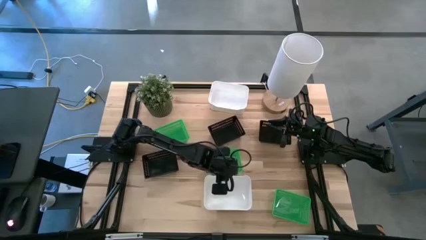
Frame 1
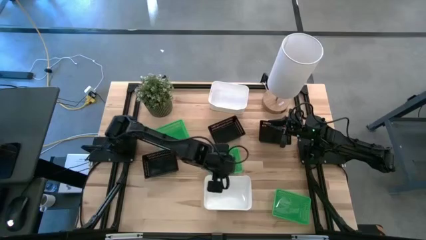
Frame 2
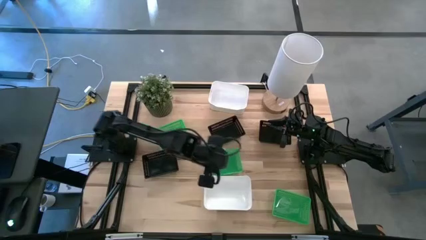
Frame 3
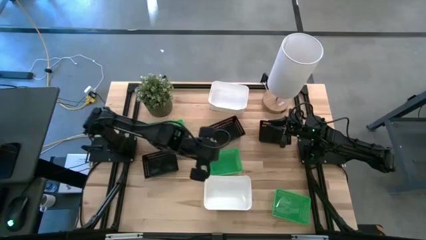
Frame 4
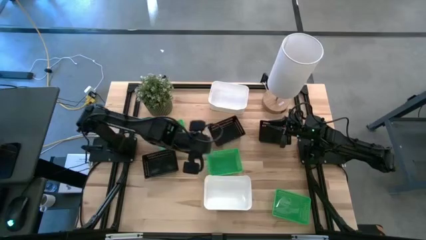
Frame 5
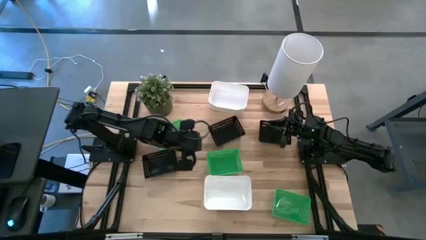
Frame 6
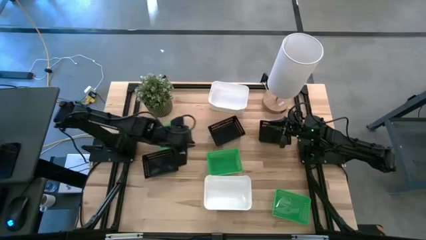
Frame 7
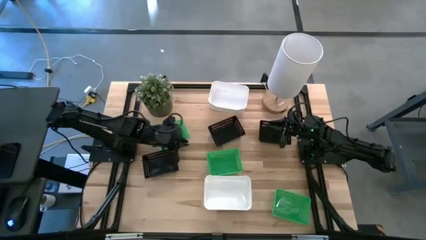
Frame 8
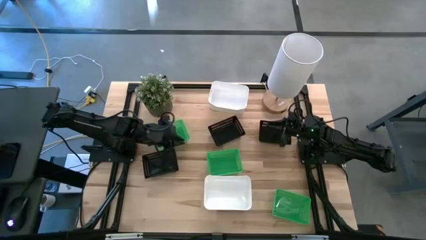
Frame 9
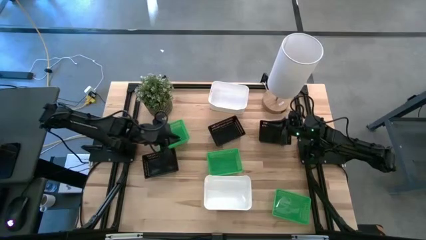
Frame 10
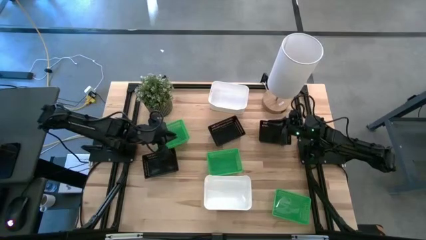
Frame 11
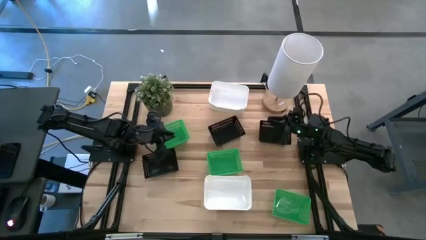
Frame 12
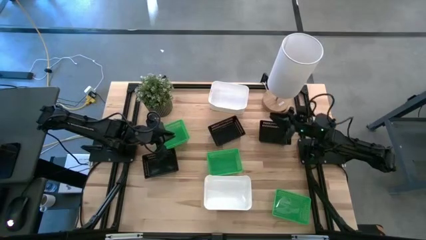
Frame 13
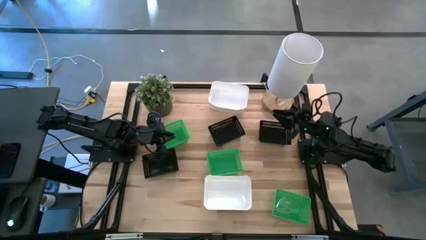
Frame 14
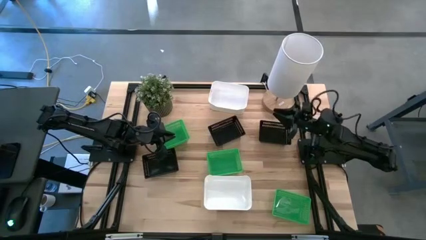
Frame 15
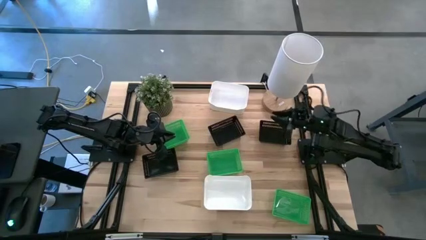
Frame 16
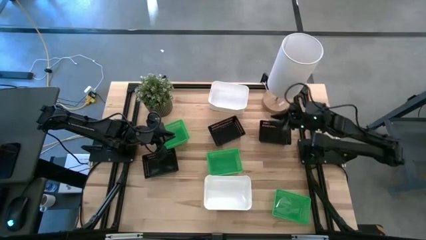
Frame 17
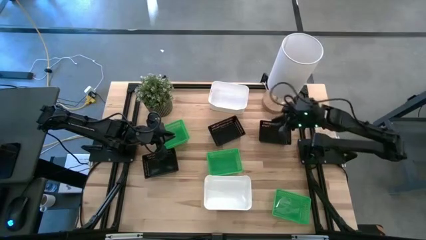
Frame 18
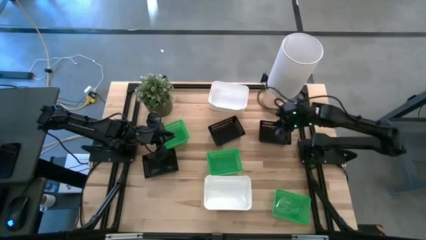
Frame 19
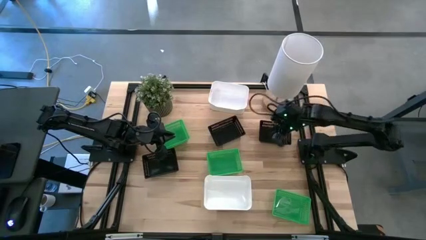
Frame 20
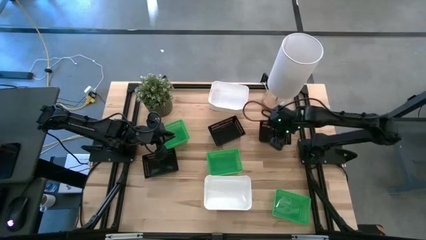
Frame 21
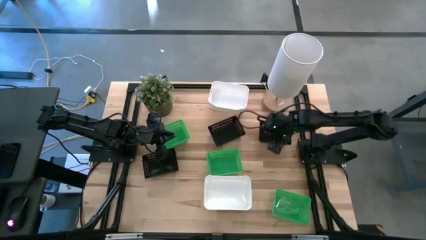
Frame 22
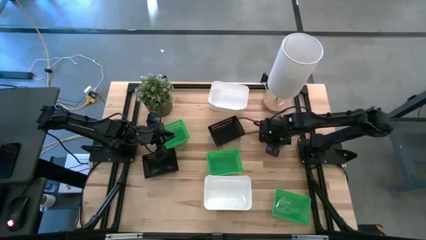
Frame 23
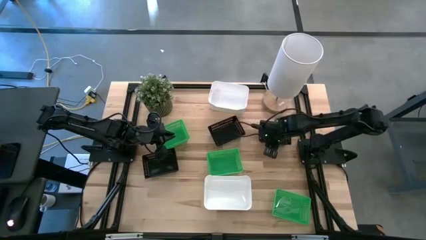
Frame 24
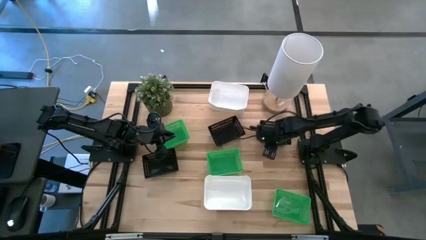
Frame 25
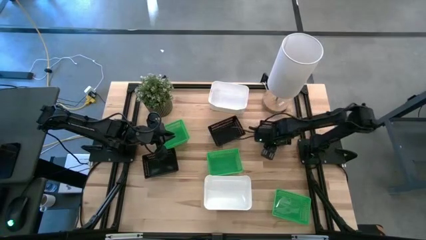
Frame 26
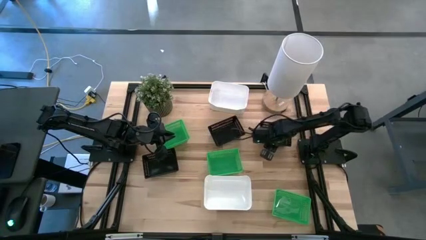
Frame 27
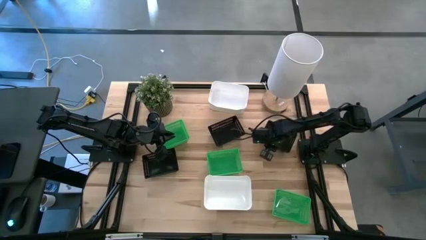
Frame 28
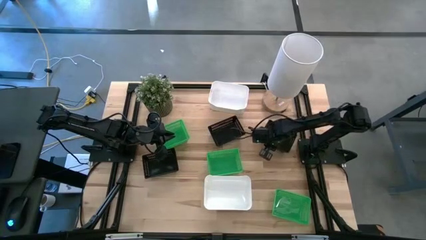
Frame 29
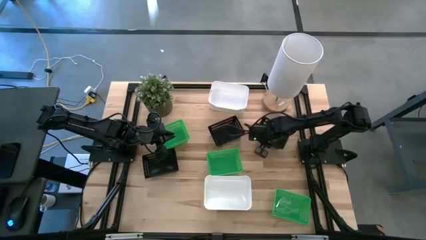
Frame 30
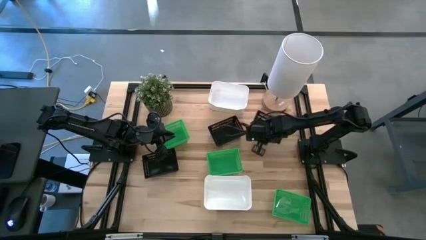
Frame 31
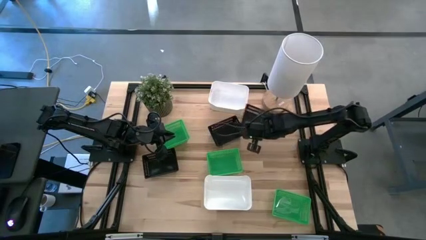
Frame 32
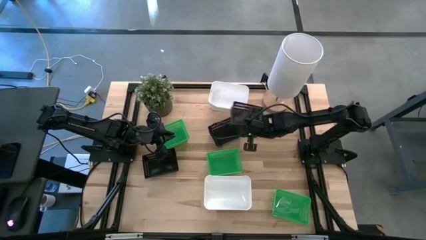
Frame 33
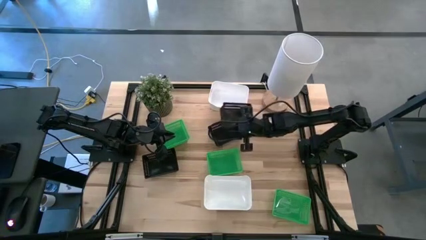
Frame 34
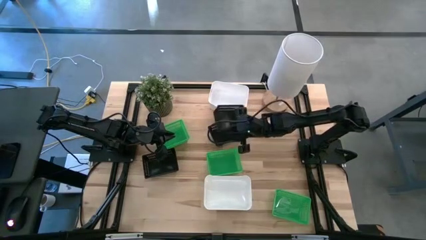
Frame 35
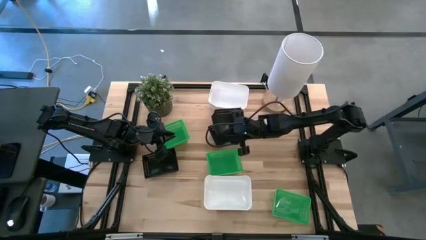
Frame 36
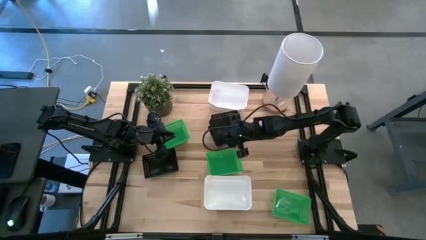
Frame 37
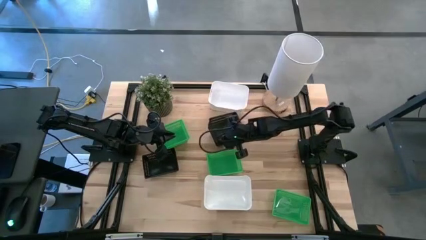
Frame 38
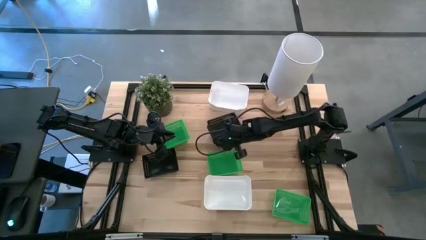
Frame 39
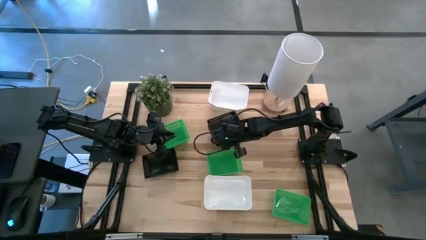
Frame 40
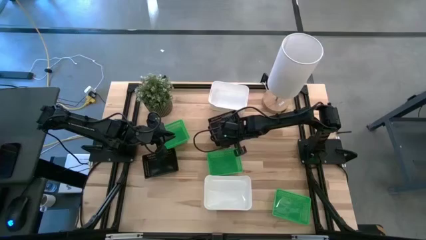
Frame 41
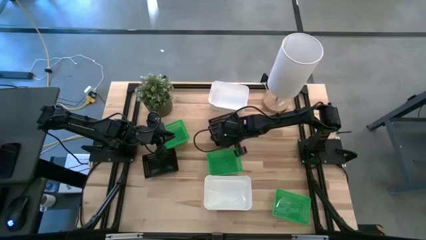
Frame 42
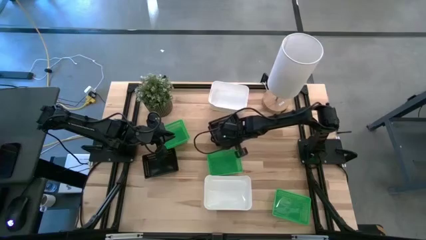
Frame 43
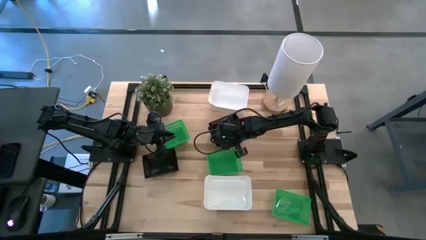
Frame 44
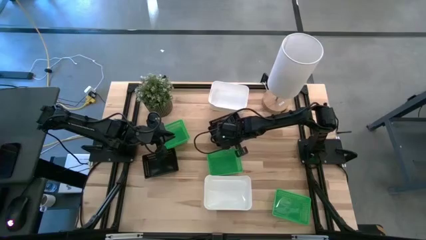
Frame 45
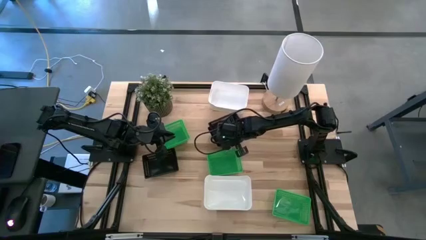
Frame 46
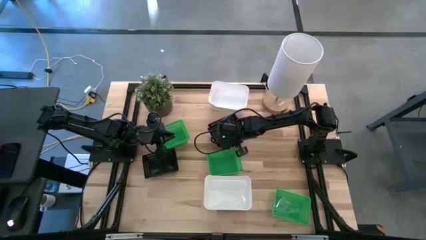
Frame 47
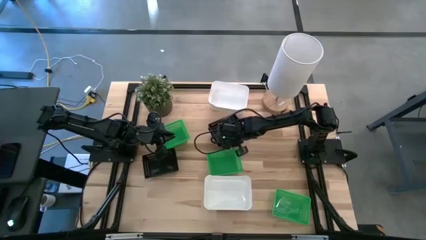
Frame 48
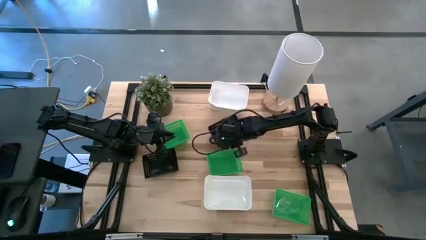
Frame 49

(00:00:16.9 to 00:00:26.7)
Stack the top right black bin on the top left black bin

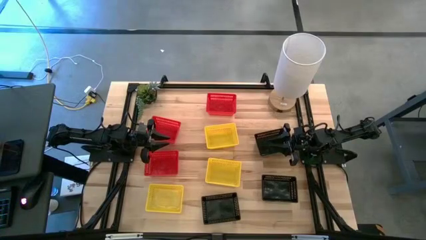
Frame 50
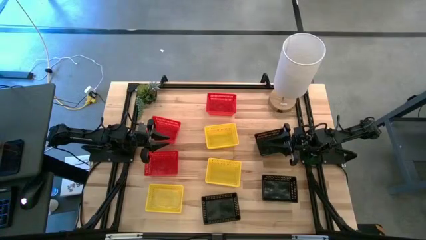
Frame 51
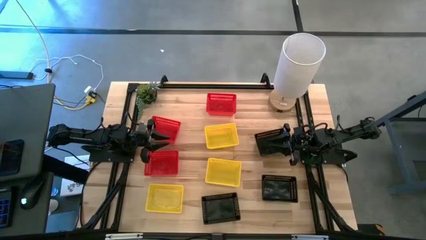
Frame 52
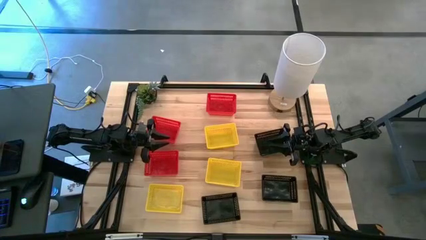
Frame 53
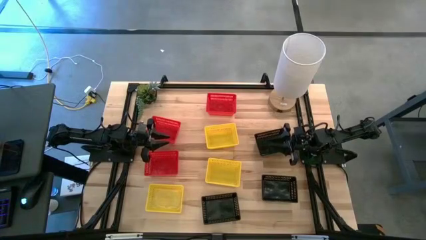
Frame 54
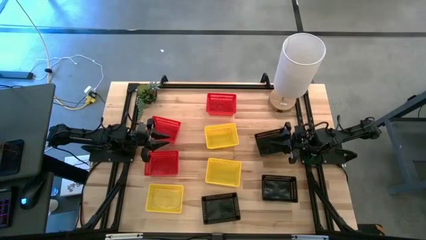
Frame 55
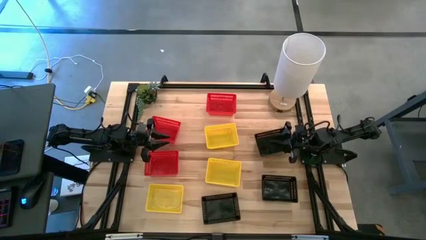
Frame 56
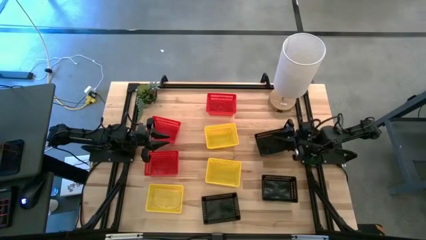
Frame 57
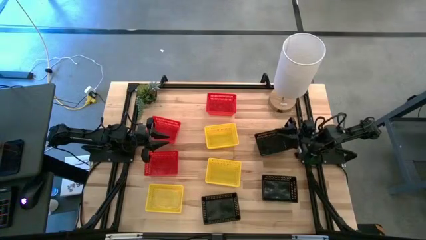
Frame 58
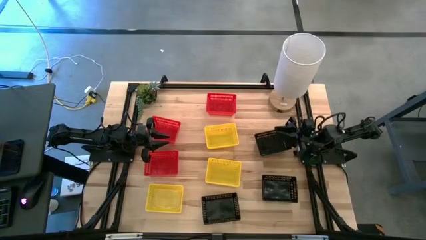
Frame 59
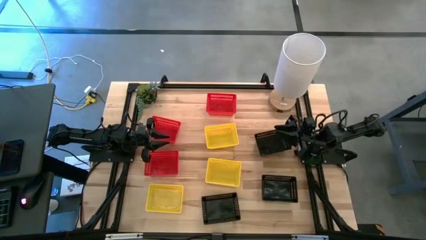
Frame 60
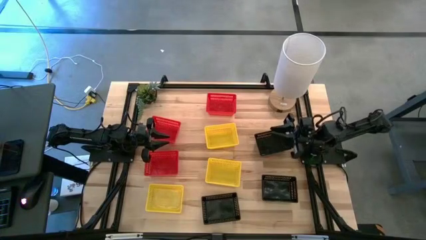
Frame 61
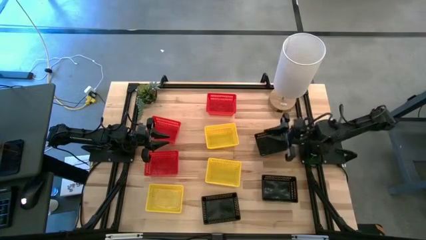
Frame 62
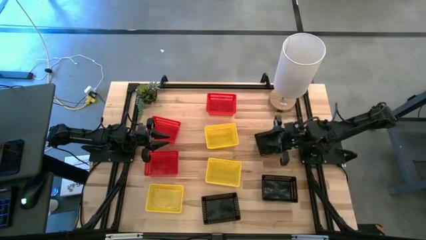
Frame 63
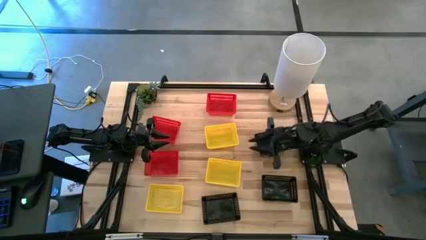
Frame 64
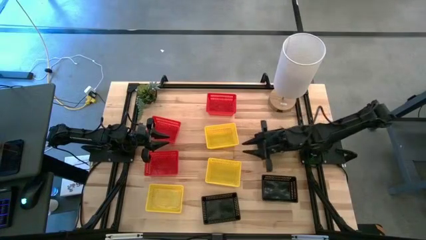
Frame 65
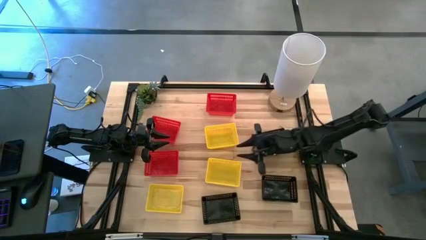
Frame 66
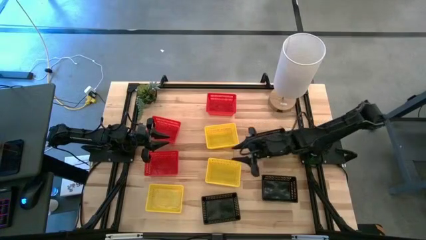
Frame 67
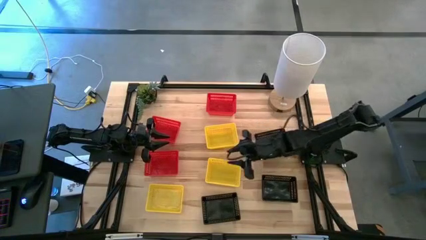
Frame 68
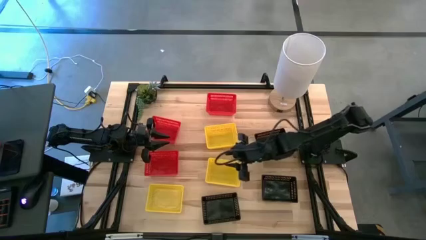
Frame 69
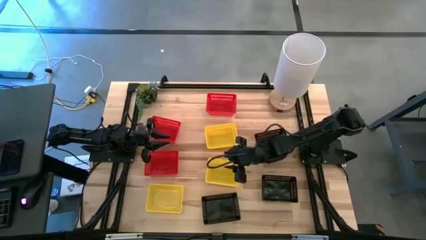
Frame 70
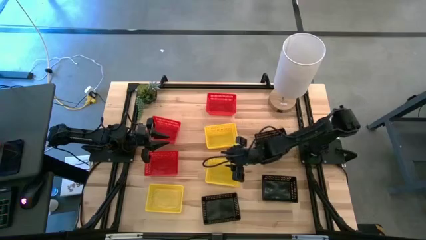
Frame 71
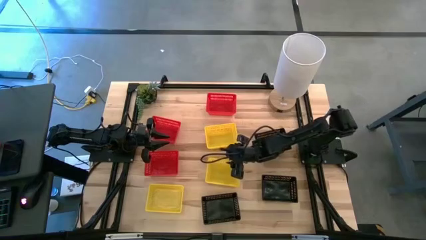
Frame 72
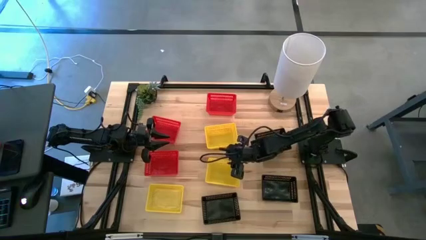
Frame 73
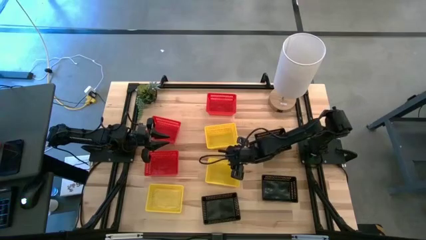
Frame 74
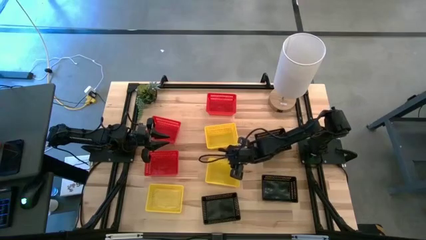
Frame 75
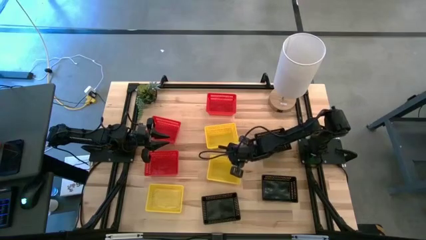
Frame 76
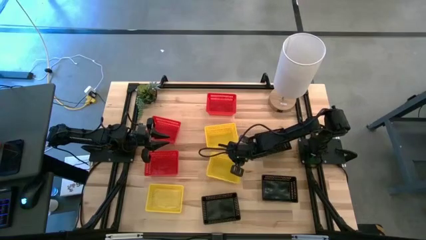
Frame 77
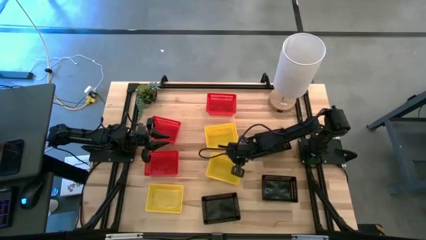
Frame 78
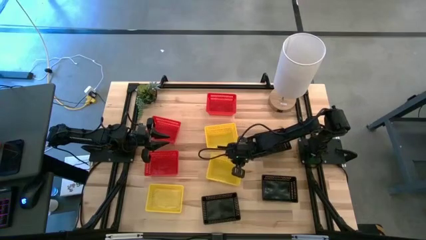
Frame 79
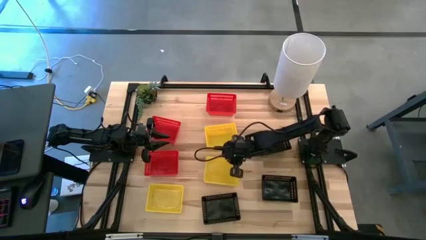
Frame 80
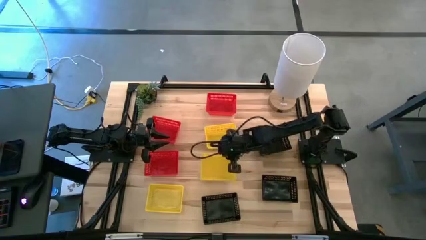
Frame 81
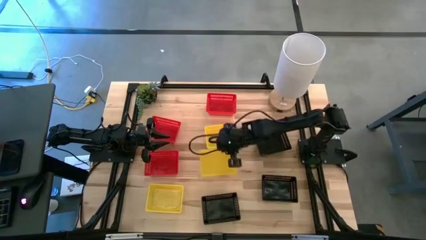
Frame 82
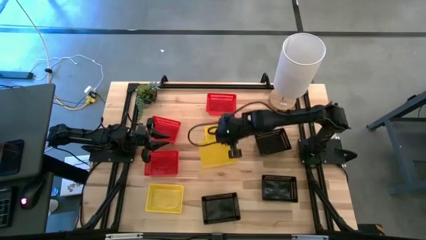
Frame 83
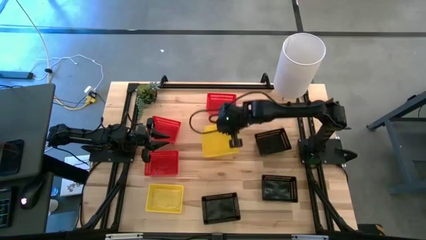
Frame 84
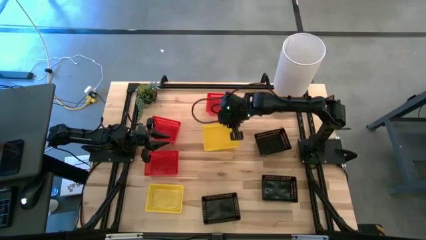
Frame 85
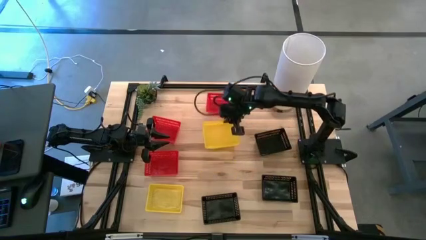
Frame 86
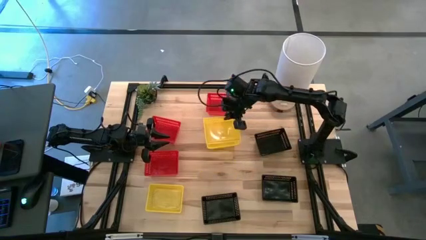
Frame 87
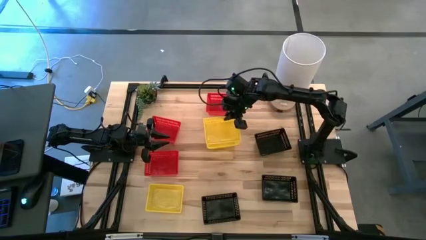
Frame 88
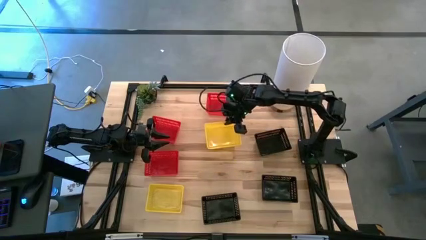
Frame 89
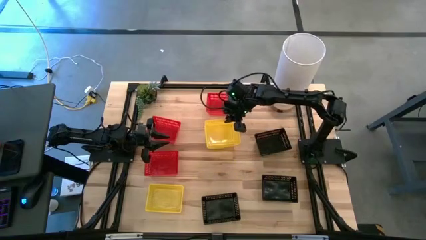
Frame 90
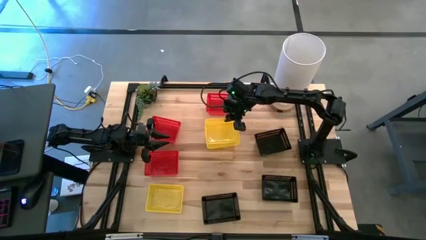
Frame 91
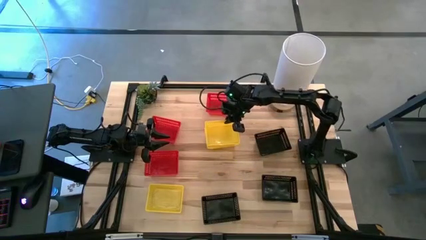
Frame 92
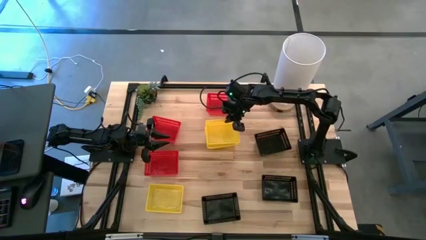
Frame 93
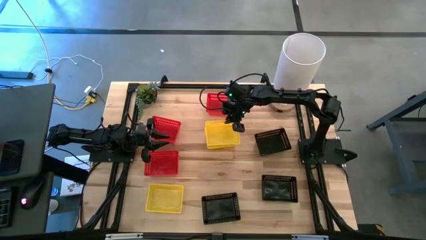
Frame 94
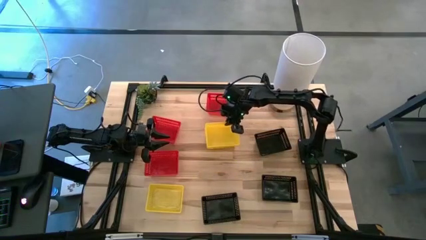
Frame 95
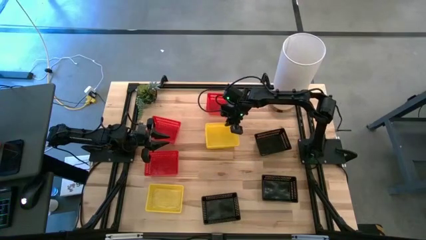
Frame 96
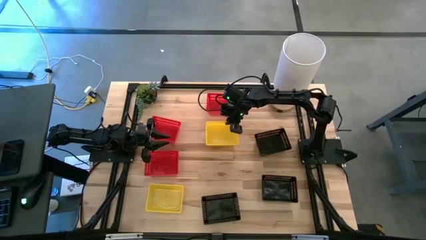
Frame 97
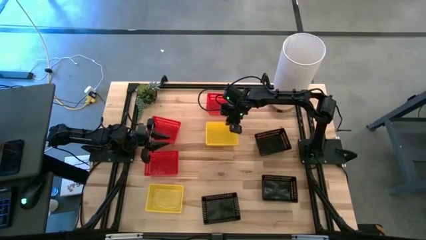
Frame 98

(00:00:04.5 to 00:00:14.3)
Stack the middle yellow bin on the top yellow bin
